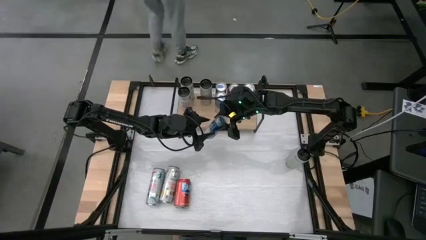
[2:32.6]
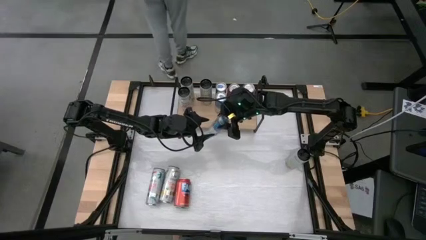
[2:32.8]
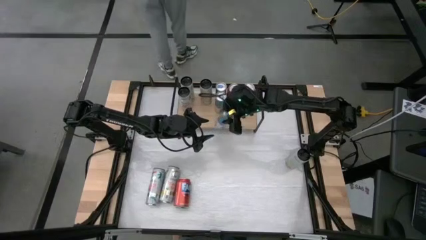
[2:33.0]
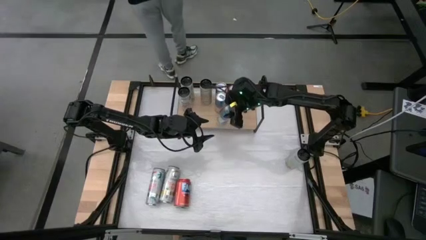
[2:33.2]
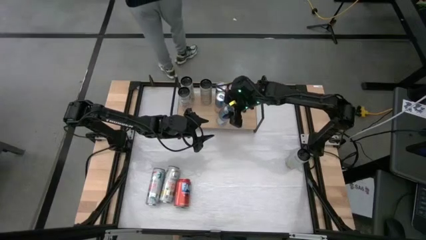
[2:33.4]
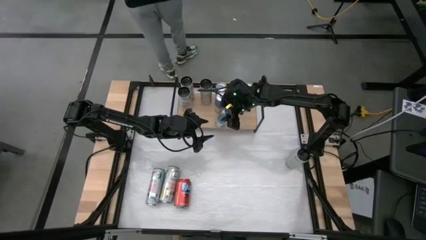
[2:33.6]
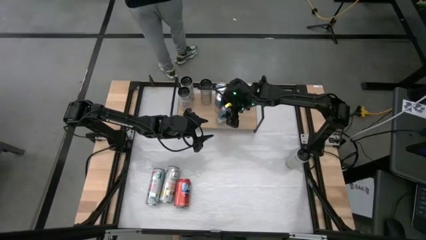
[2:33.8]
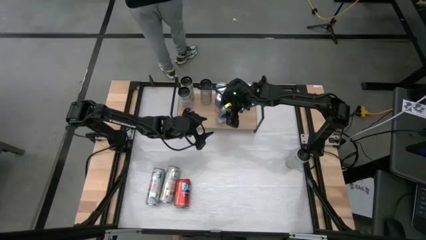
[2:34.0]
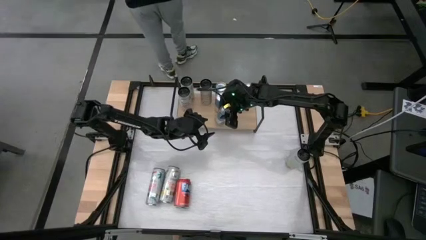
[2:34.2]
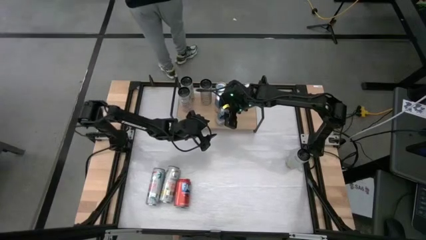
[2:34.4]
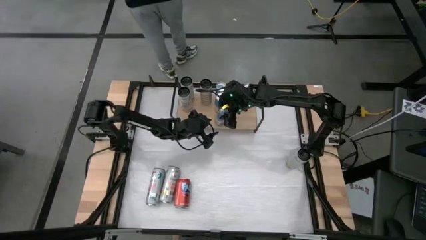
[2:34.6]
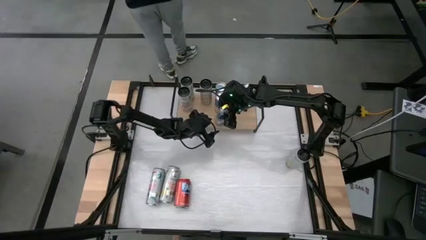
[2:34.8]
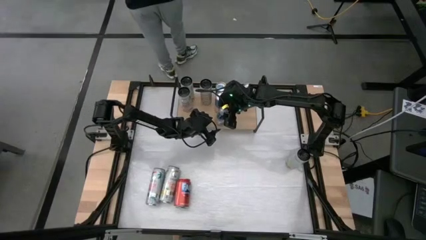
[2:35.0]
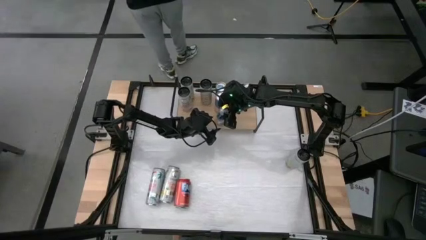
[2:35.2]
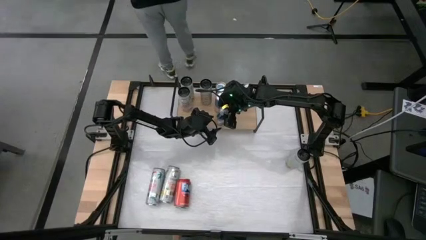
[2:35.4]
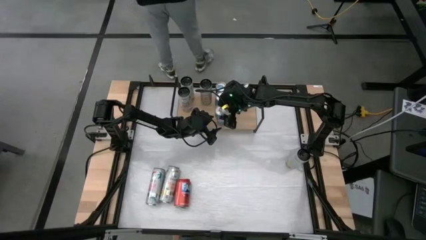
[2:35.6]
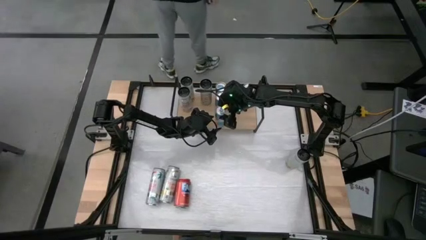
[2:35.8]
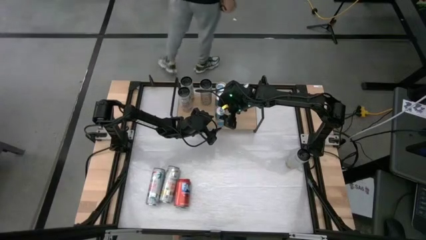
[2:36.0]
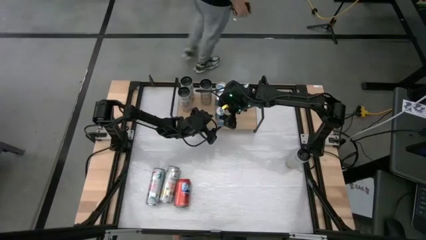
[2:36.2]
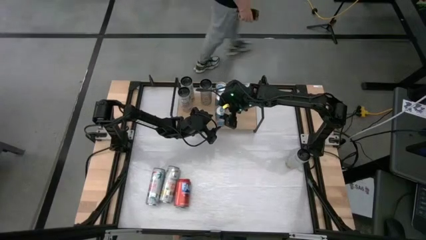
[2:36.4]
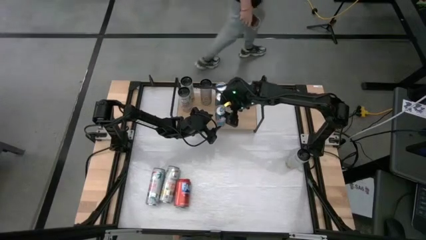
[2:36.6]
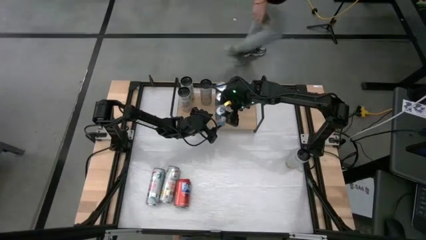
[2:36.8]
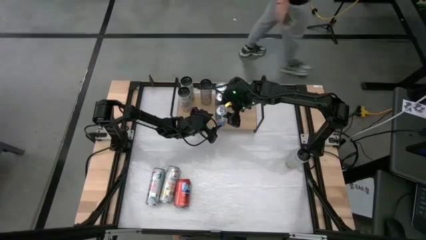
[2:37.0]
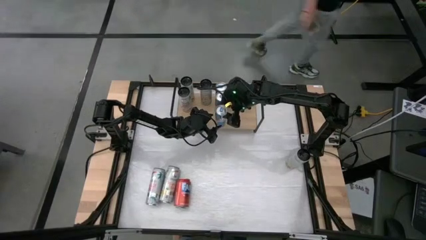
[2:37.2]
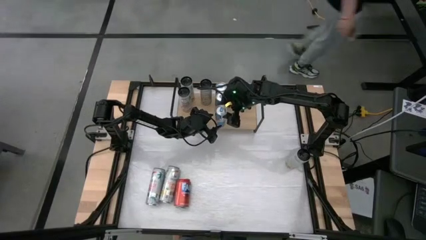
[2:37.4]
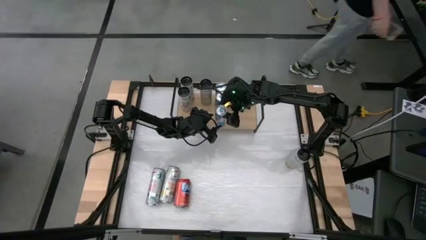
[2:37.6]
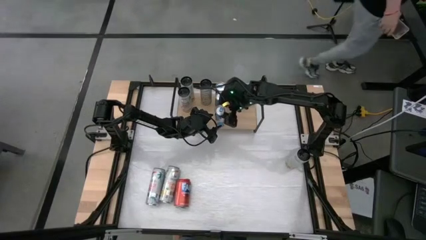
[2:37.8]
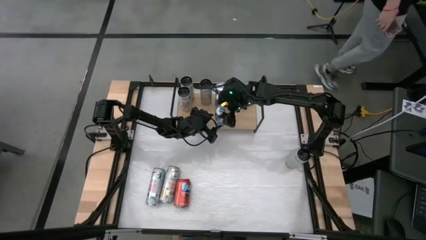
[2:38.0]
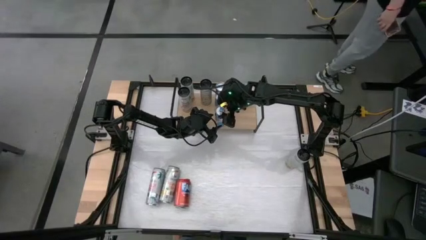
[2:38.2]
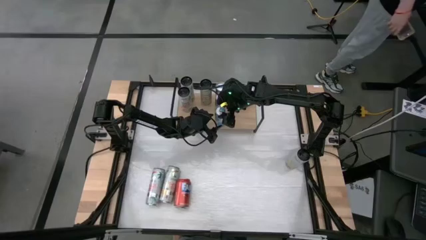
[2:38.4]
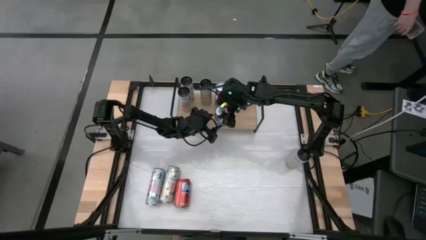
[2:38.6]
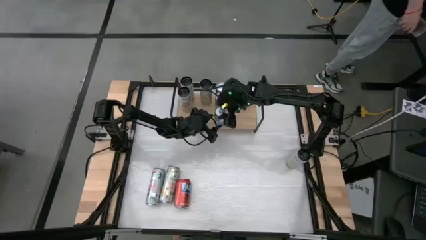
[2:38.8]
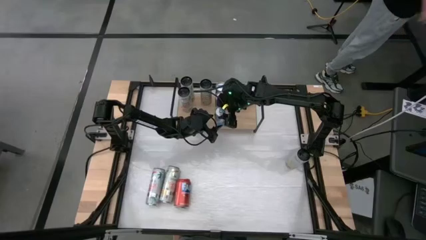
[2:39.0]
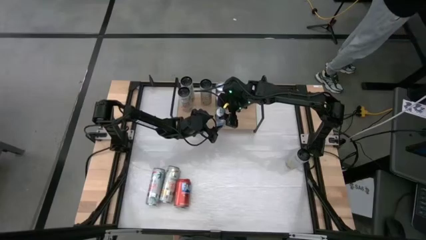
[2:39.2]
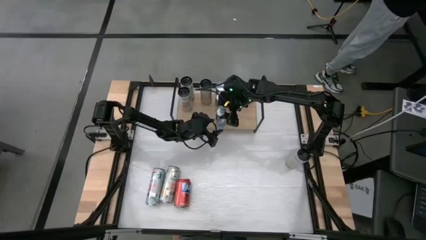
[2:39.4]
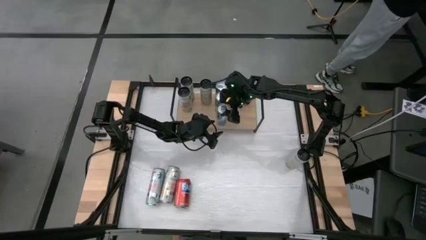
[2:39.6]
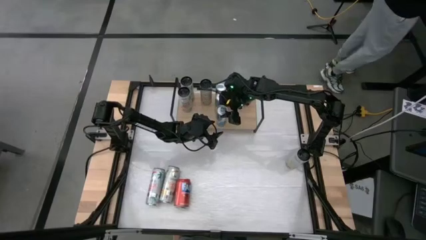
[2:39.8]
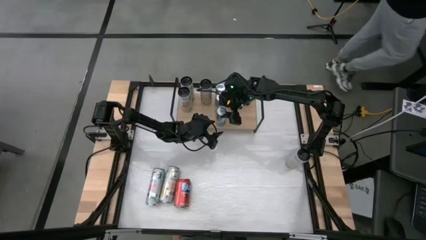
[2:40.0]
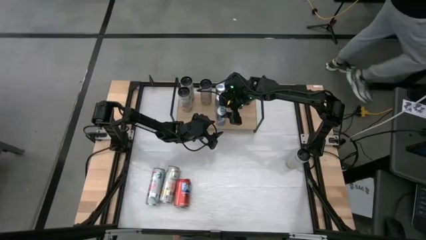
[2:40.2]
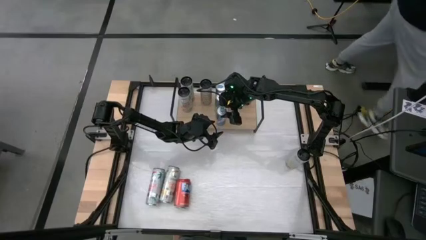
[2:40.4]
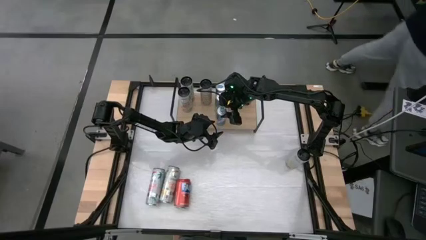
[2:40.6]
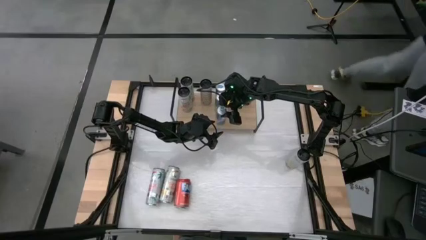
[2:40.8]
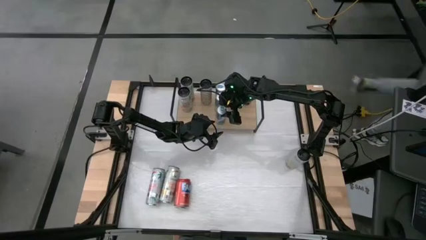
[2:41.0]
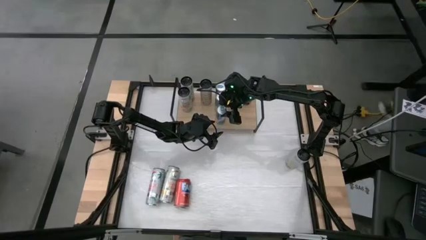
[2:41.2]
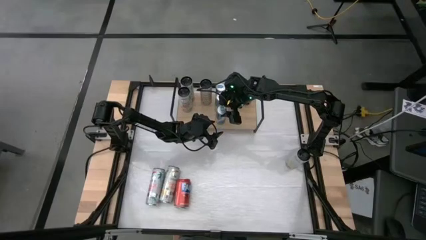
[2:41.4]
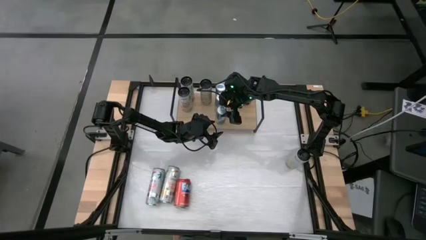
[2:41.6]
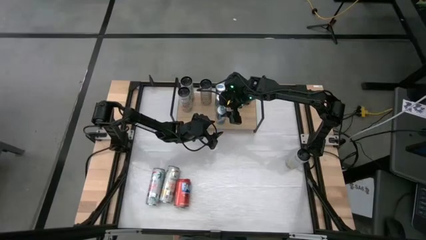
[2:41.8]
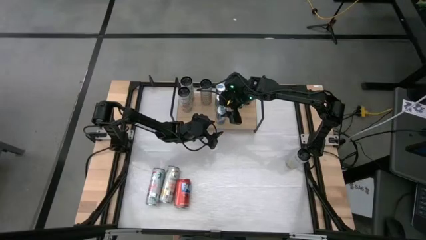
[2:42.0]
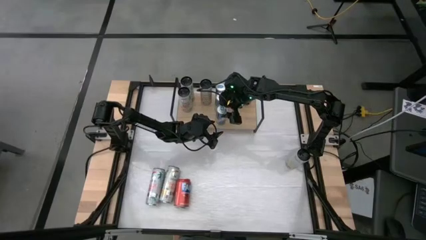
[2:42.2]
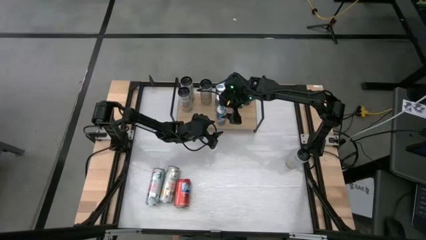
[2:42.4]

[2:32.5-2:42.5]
Task: Place canned beverage on shelf
Put the blue soda can on the shelf aligned with the other blue soda cans

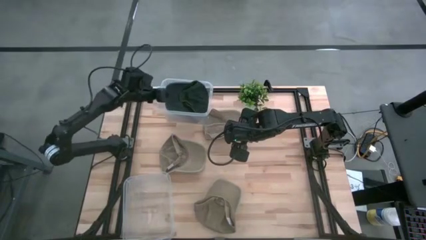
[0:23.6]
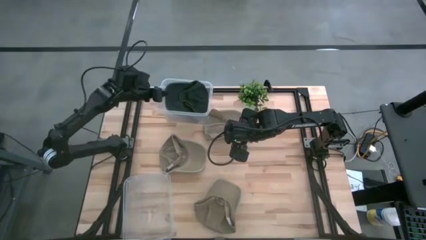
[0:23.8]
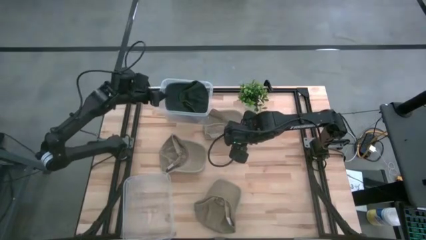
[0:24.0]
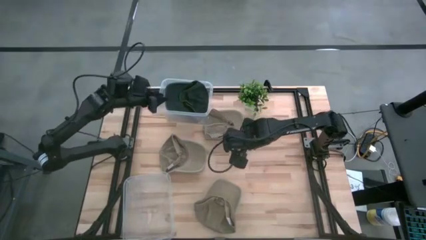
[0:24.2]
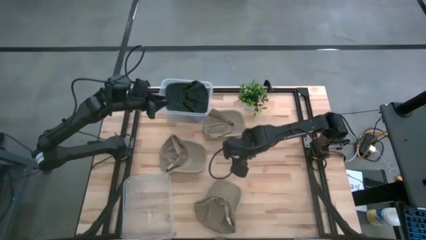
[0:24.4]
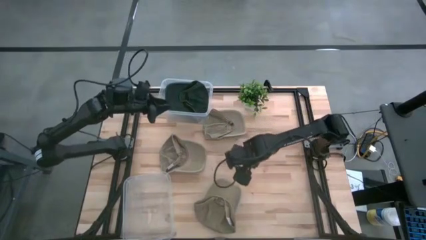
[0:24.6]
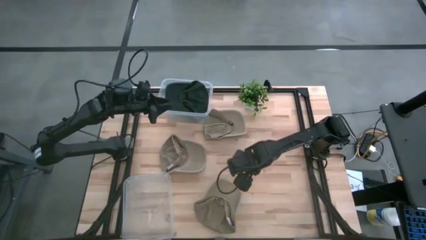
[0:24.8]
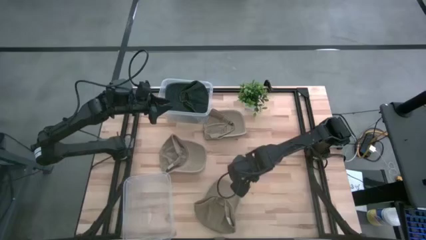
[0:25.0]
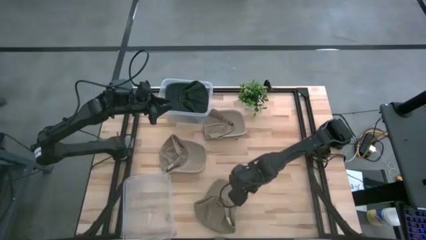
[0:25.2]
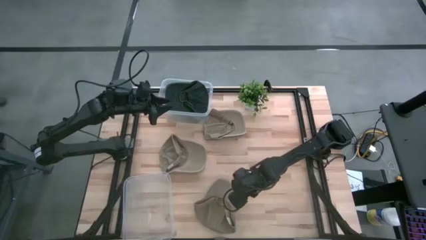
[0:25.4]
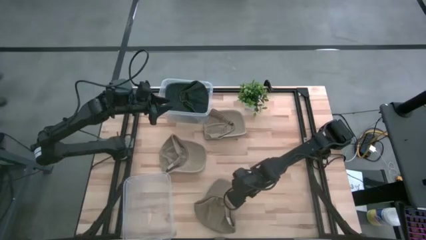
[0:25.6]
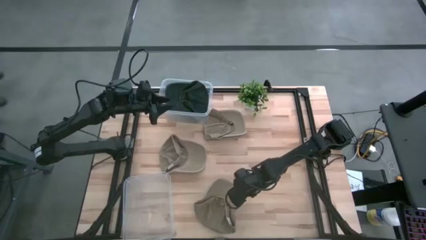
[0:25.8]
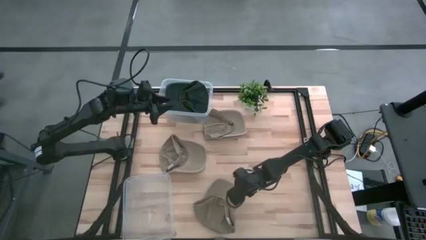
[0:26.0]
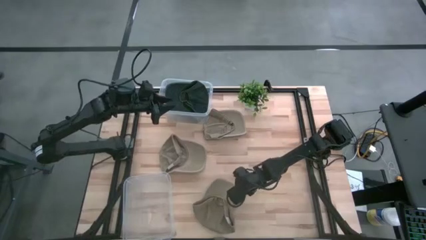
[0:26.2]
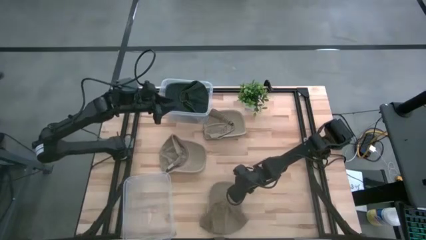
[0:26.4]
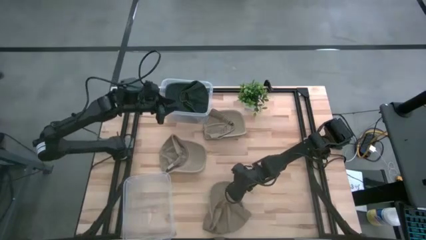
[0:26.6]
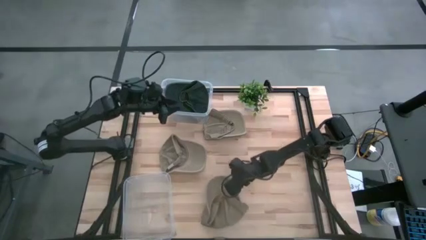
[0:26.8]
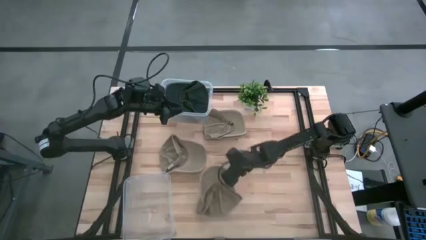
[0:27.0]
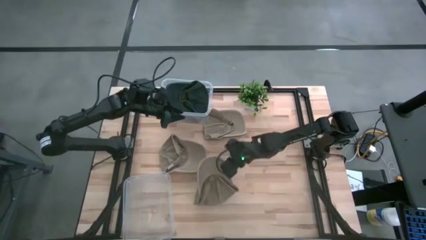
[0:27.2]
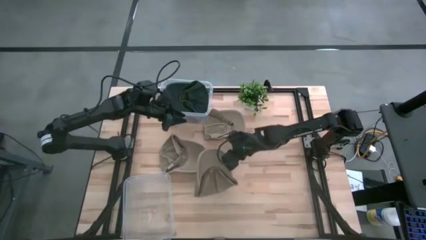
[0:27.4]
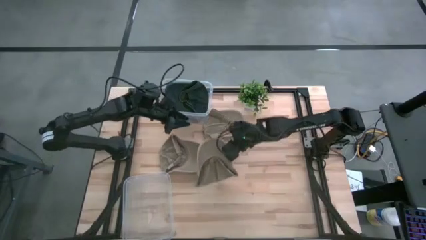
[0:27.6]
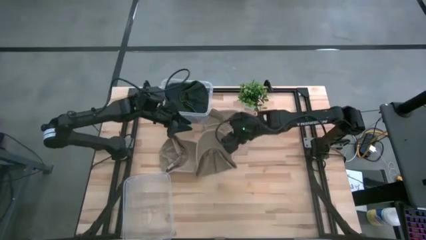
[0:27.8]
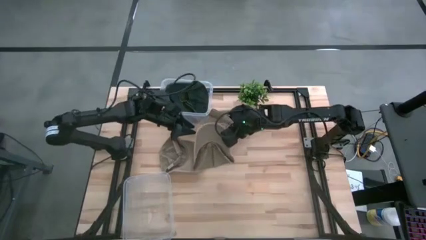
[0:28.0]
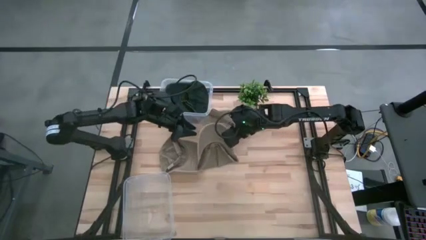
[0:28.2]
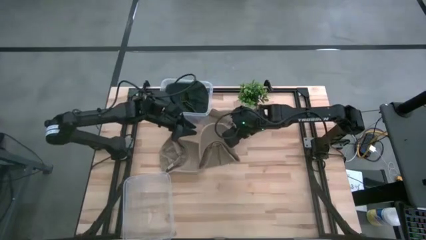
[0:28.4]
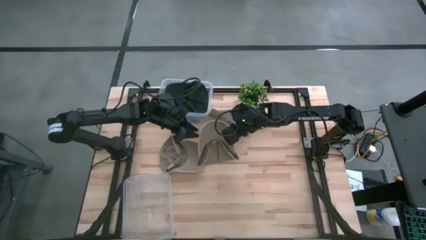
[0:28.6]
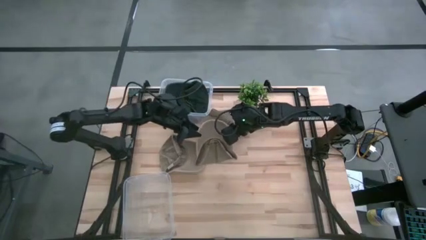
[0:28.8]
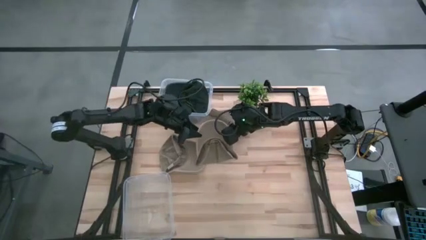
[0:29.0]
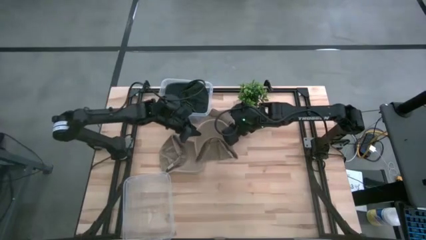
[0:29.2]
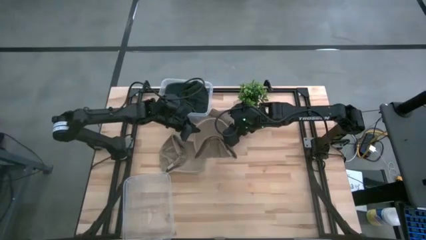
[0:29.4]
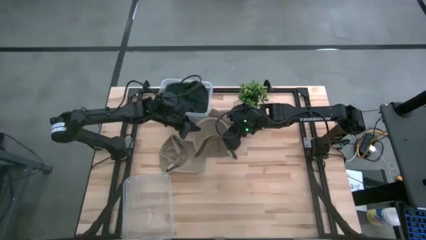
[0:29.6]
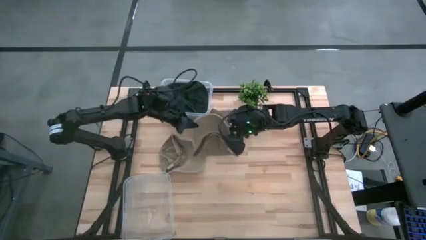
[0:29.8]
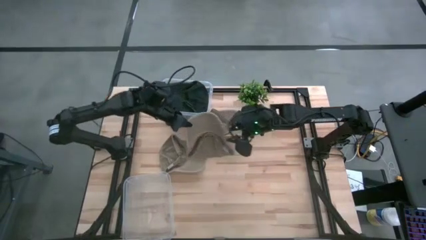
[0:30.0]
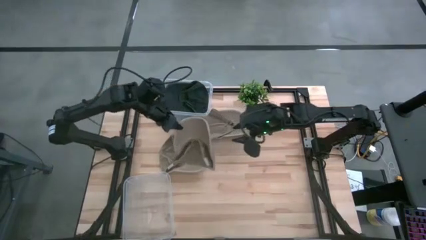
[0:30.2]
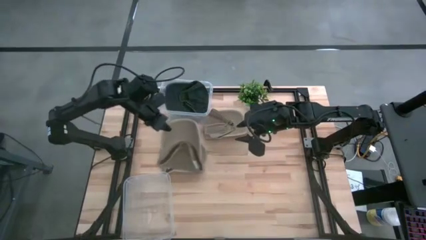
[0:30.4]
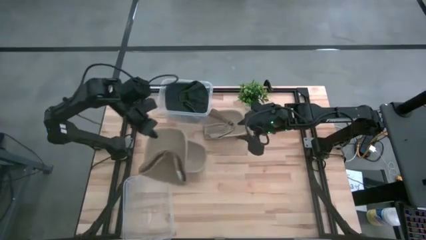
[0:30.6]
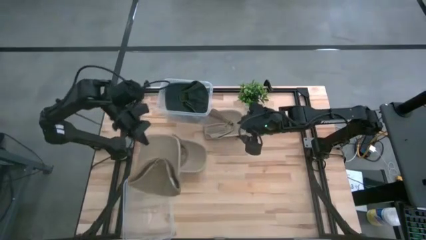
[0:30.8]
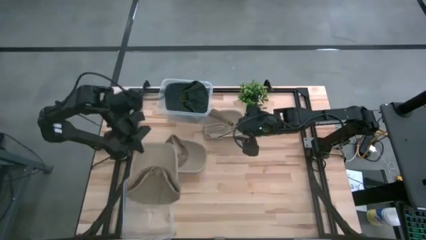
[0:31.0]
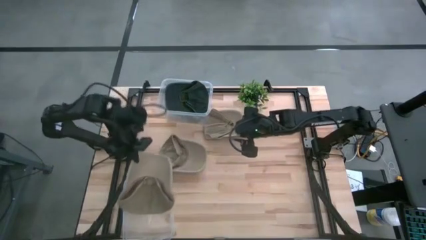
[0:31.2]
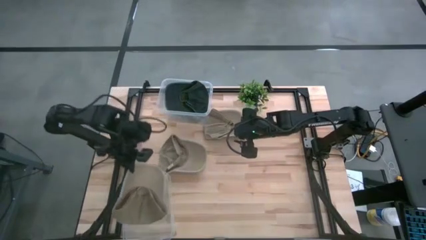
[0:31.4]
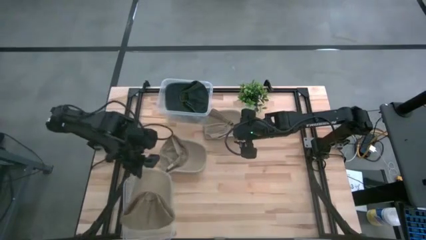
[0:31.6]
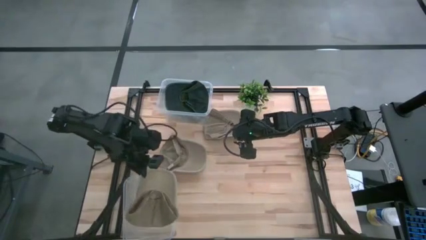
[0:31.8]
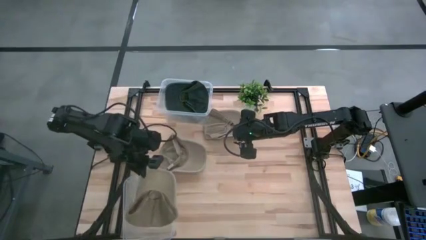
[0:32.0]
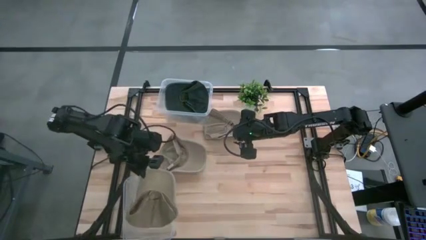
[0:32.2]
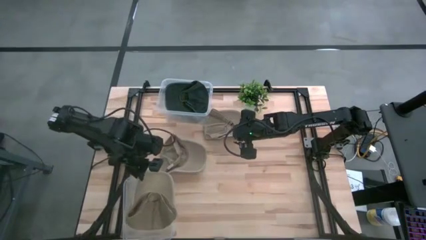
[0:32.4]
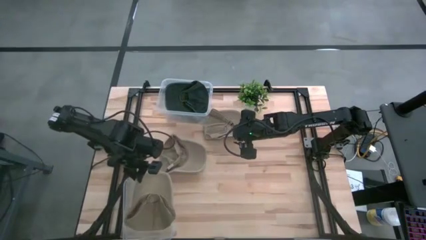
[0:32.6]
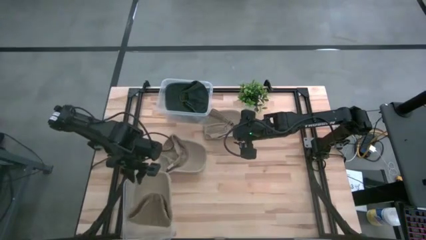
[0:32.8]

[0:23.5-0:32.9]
Task: Pick & Place hat
Put the bottom brown cap in the bottom transparent bin
